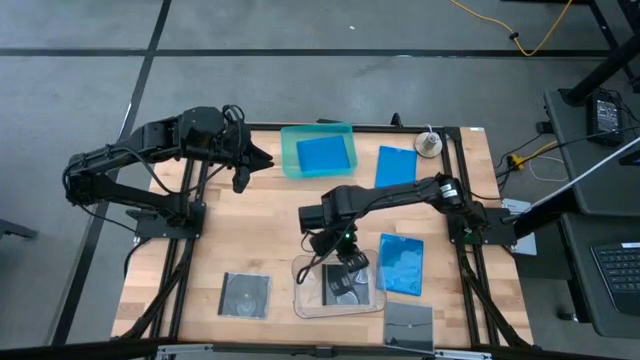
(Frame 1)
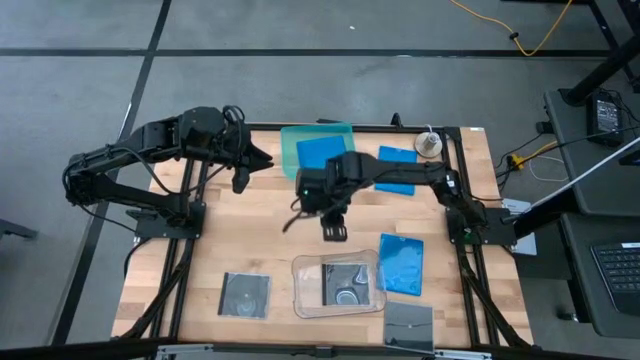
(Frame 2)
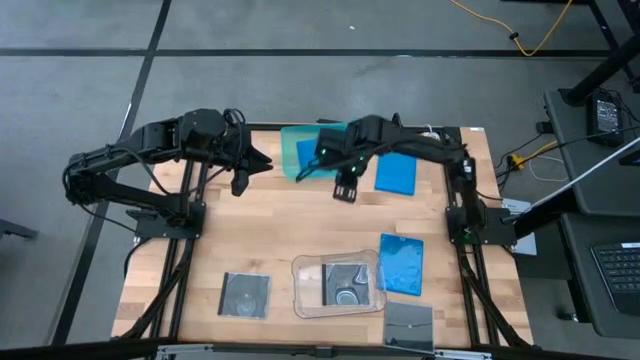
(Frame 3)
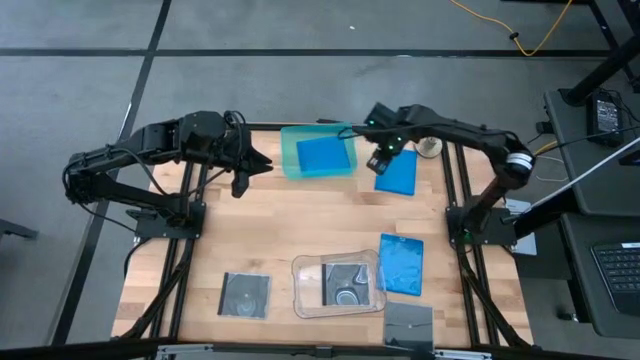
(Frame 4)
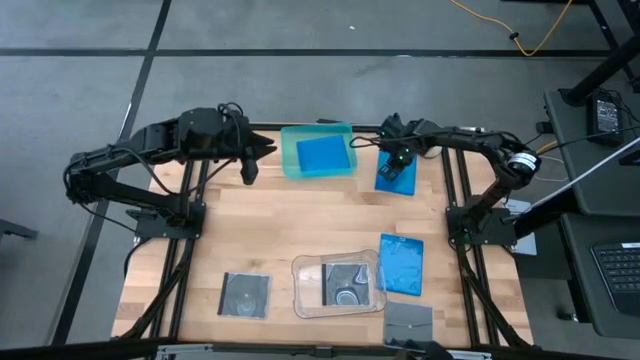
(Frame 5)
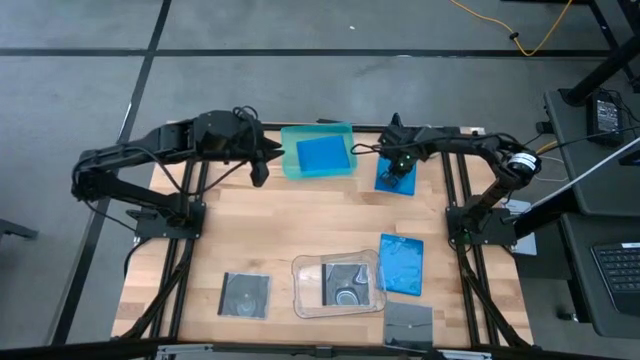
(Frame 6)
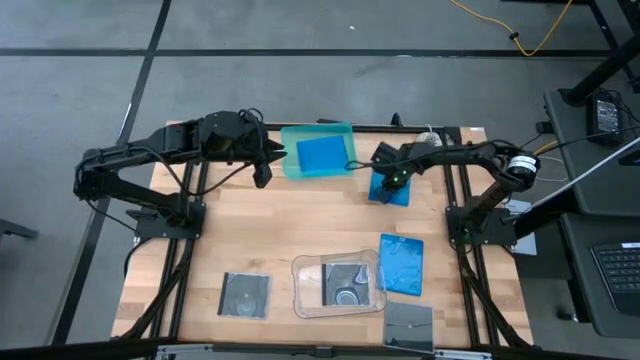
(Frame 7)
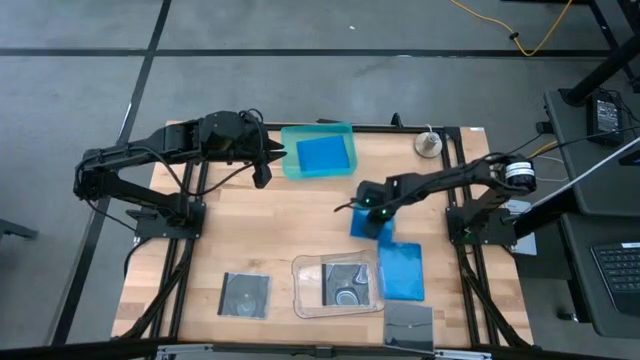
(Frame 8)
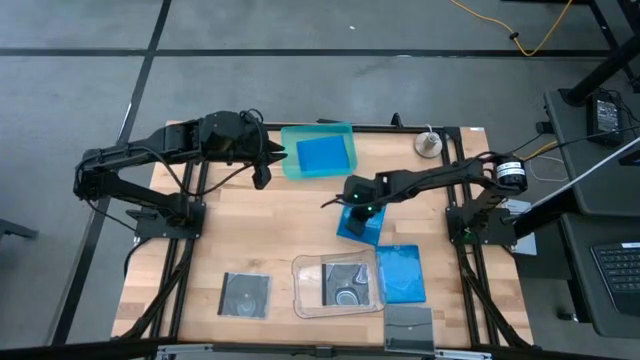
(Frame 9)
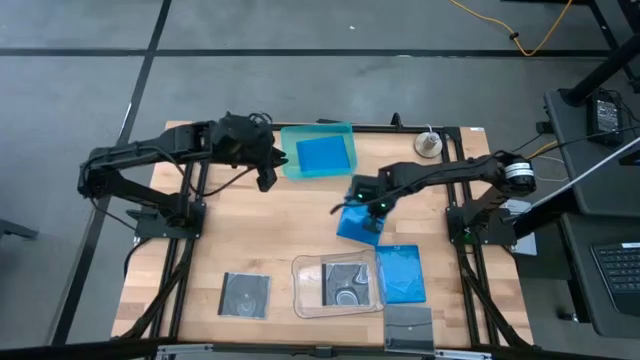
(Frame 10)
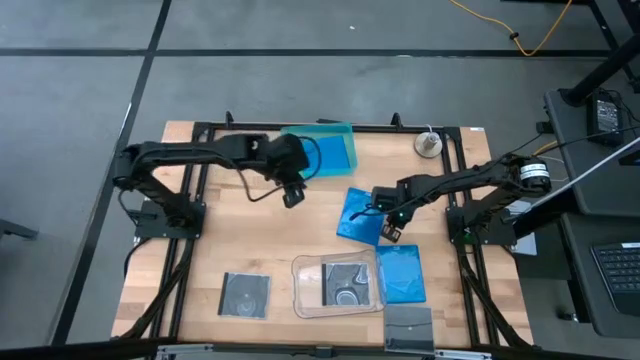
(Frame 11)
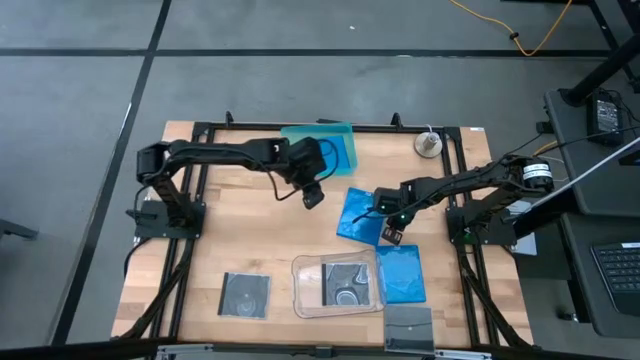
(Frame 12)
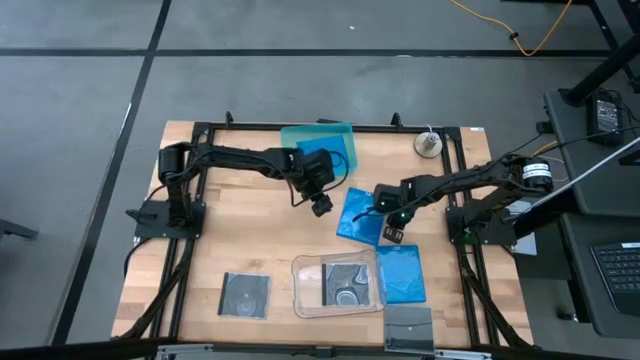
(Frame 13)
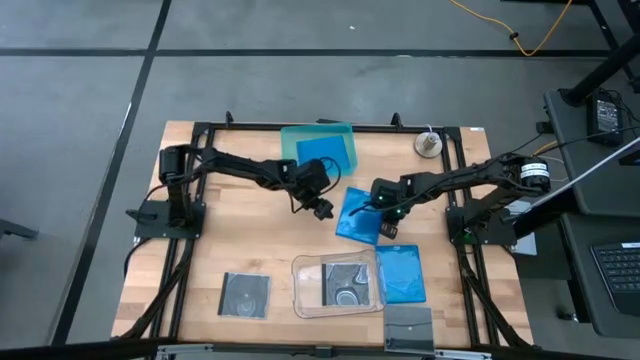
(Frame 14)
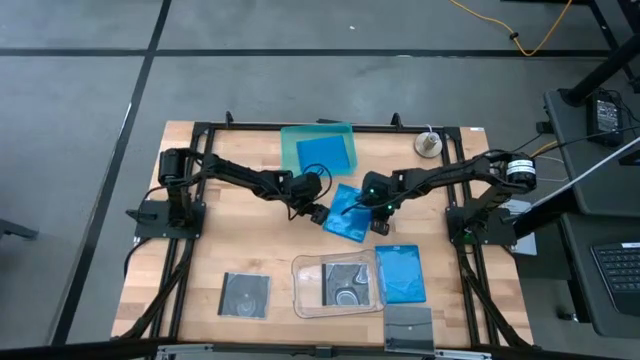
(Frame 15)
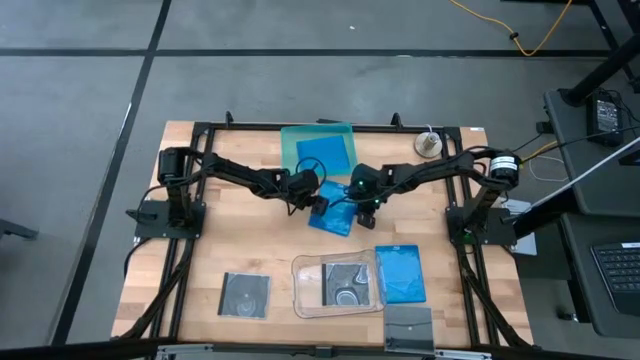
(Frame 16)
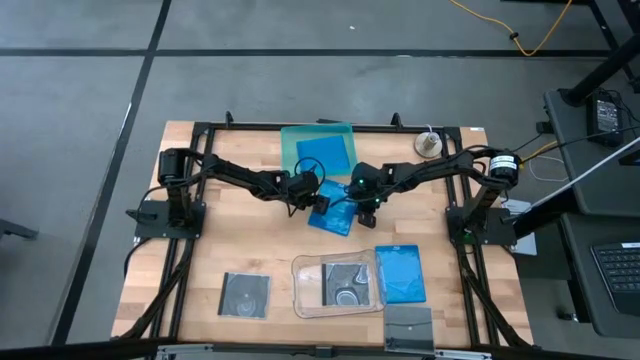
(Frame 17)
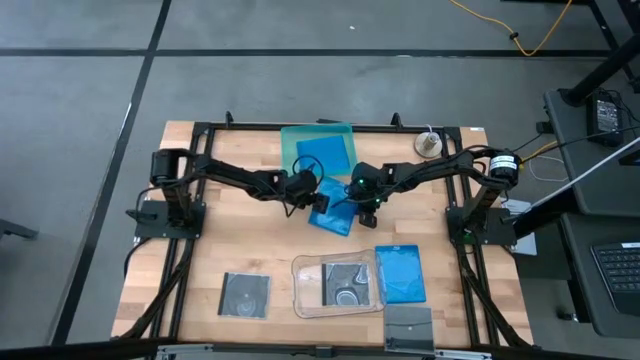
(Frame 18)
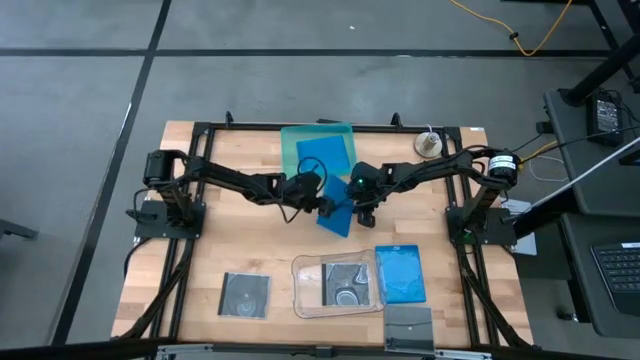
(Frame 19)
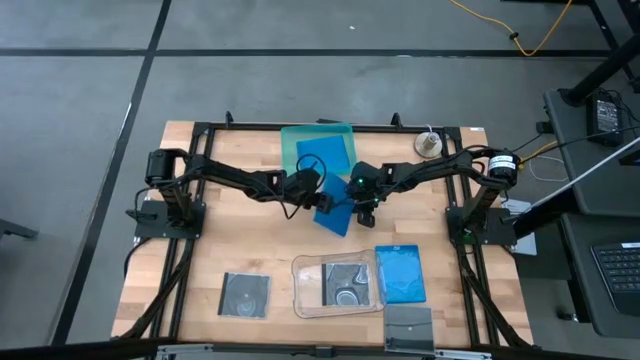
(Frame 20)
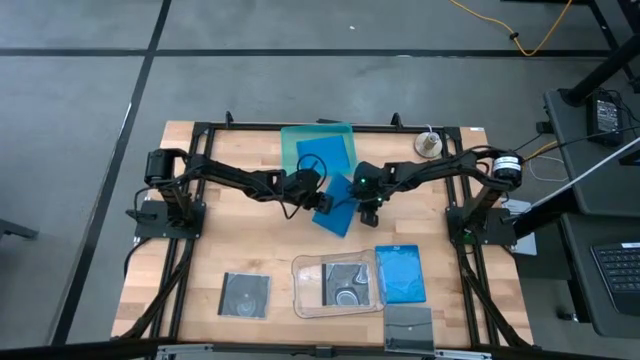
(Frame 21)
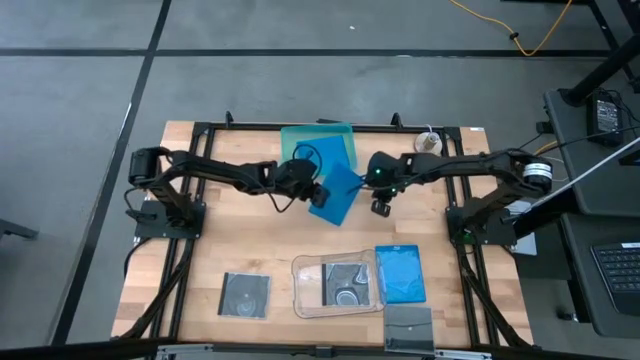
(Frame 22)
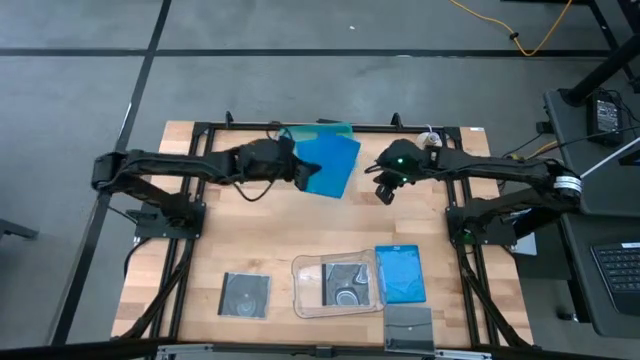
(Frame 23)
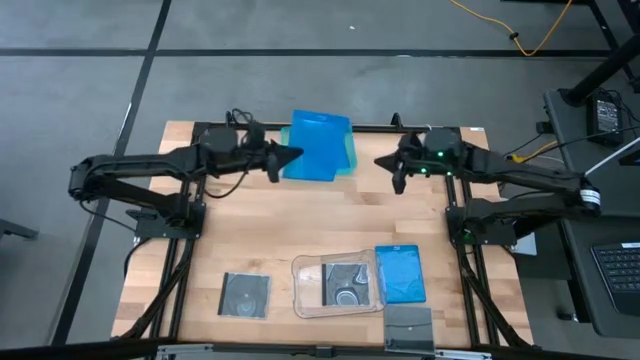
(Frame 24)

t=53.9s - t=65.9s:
Task: Pick & place jewel cases by type
Put the top blue CD case into the green bin

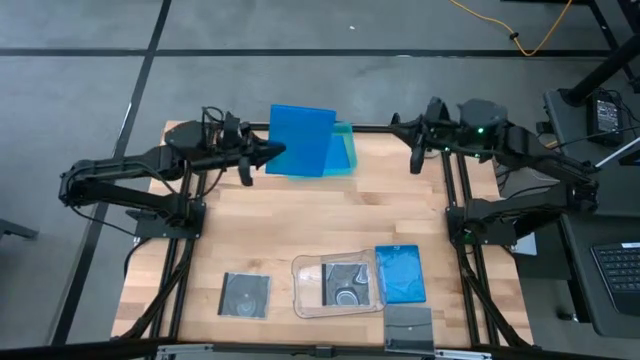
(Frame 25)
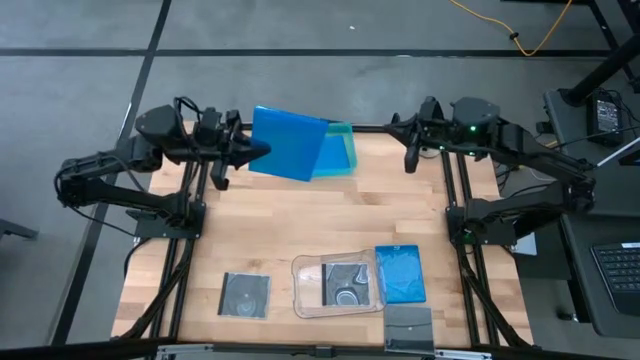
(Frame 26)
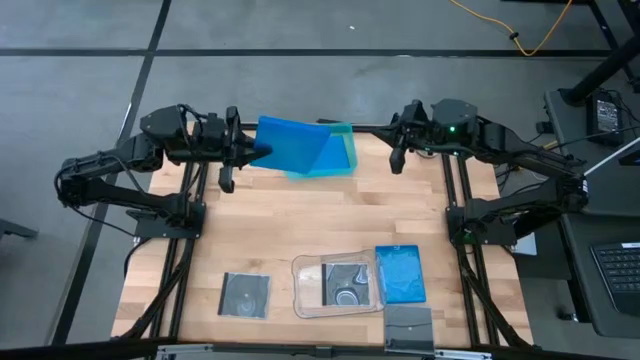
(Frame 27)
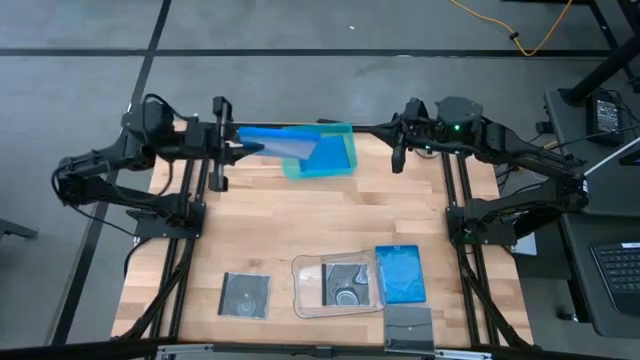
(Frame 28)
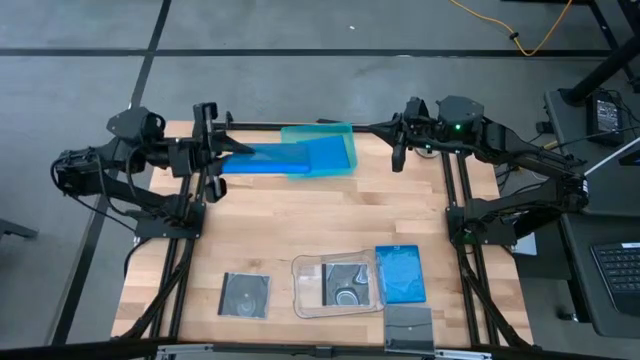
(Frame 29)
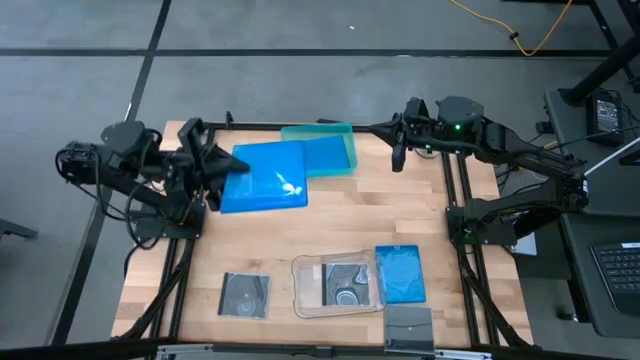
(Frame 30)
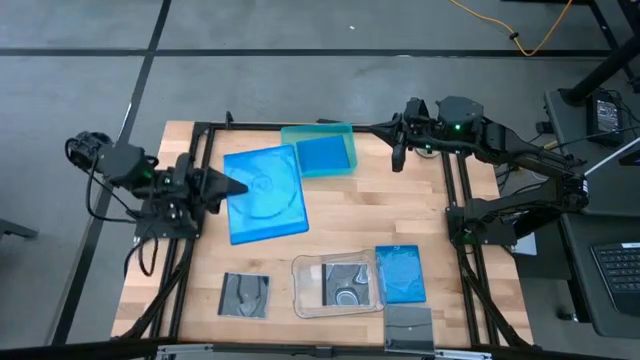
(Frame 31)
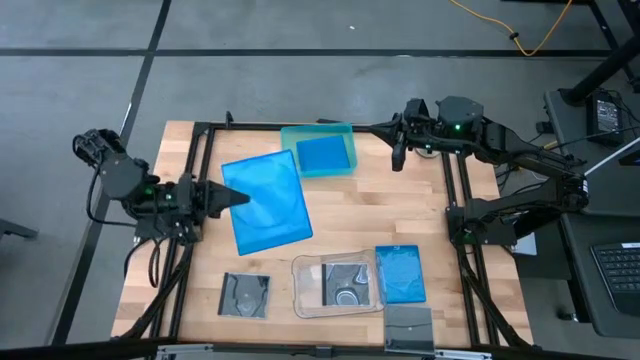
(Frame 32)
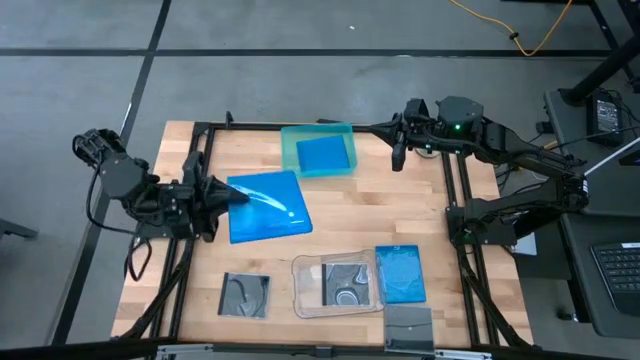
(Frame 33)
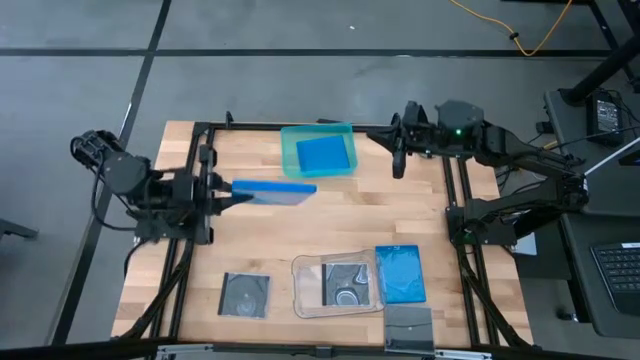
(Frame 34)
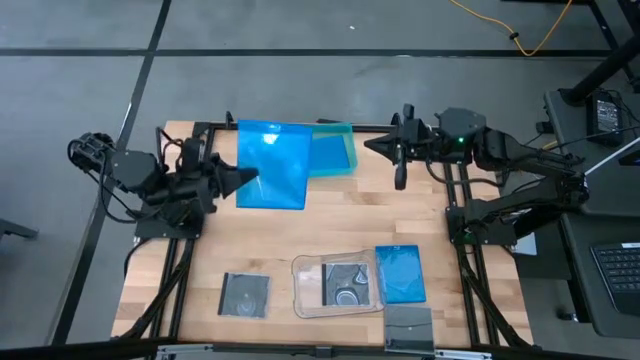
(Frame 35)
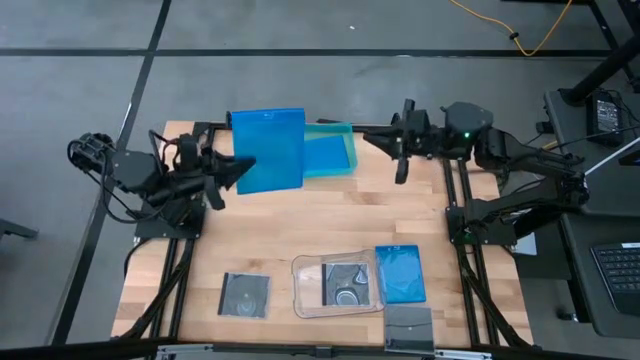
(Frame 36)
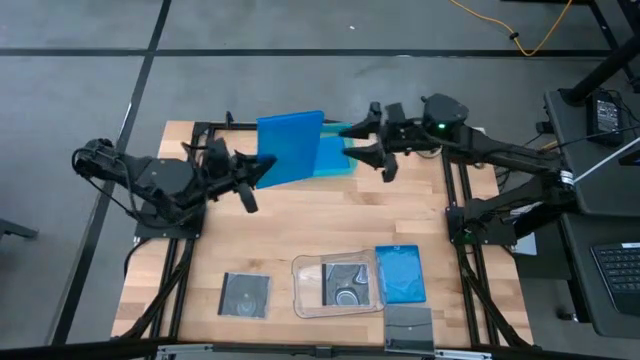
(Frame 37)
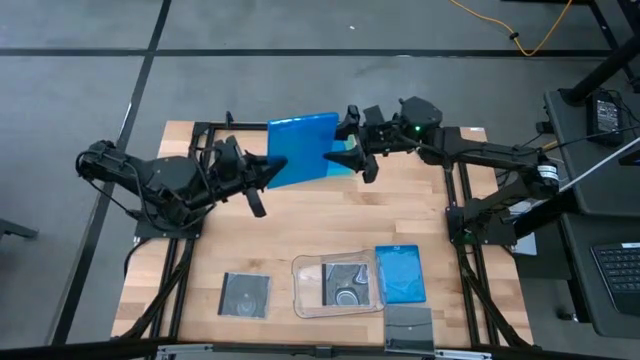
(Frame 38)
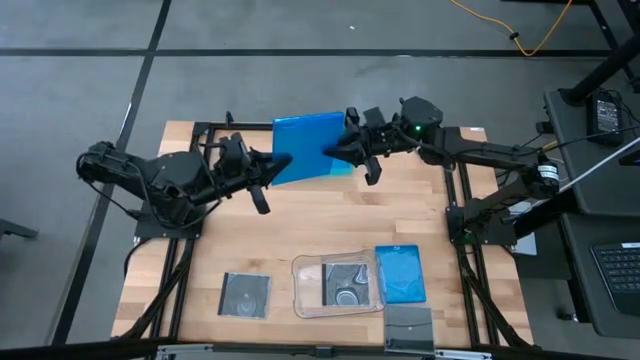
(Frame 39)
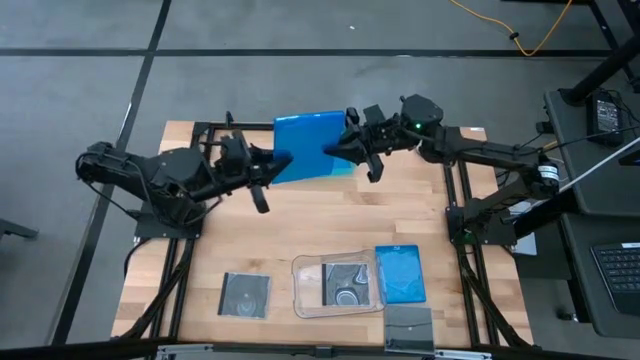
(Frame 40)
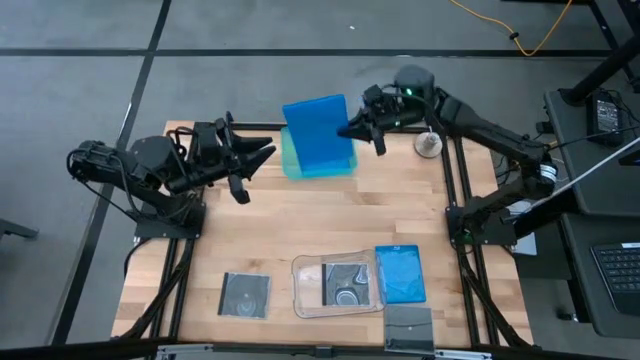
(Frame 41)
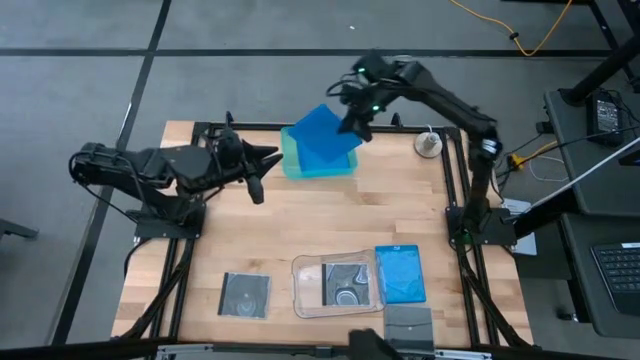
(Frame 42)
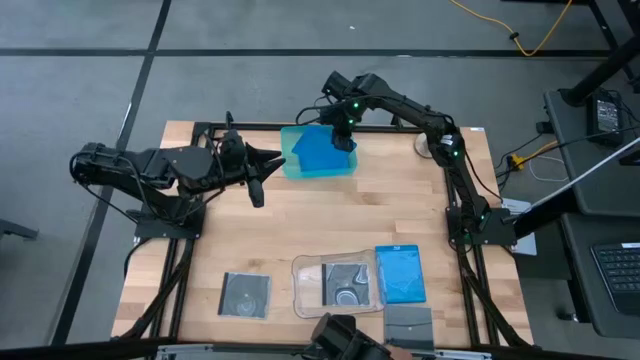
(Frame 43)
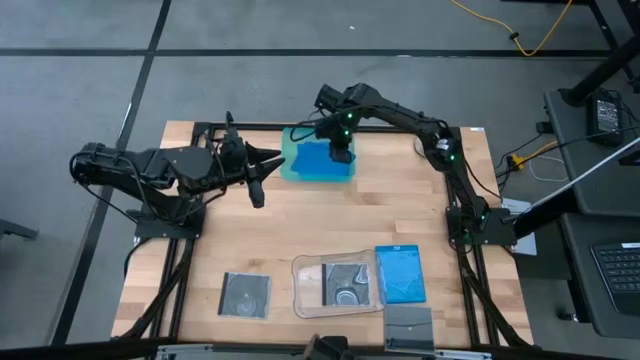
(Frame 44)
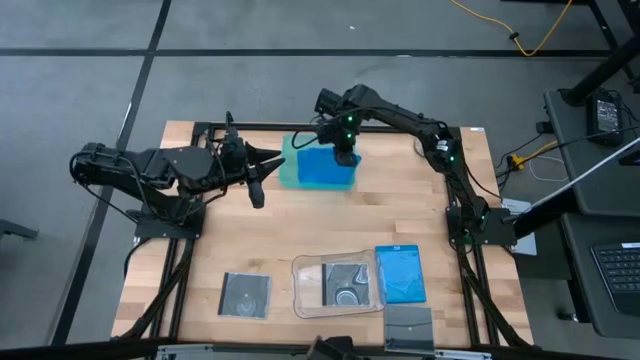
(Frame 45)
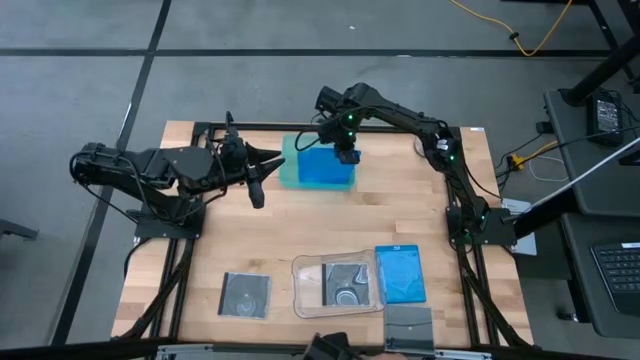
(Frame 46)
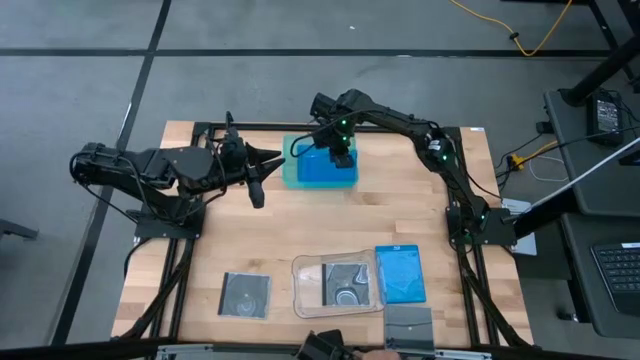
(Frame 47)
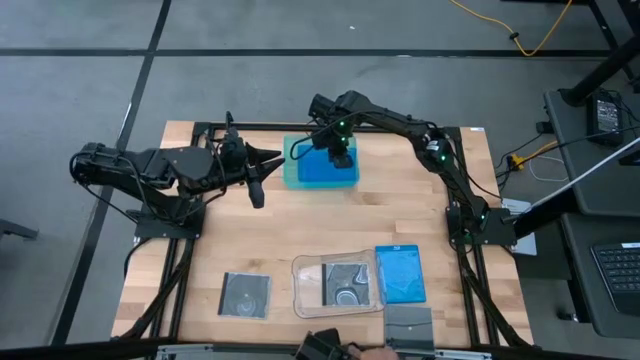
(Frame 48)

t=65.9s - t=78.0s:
Put the top blue CD case into the green bin
